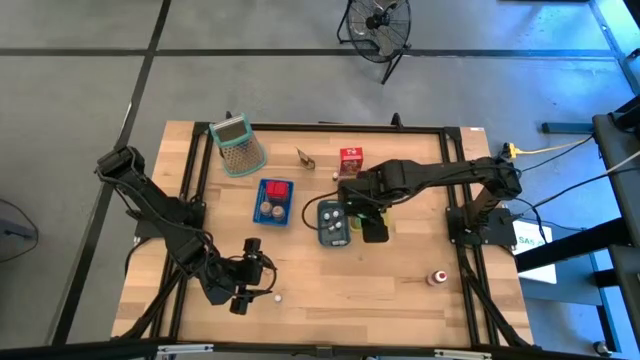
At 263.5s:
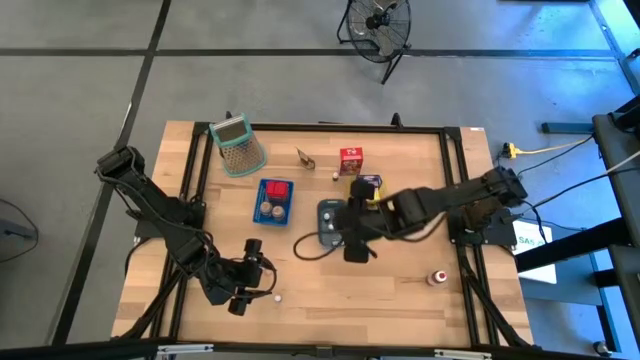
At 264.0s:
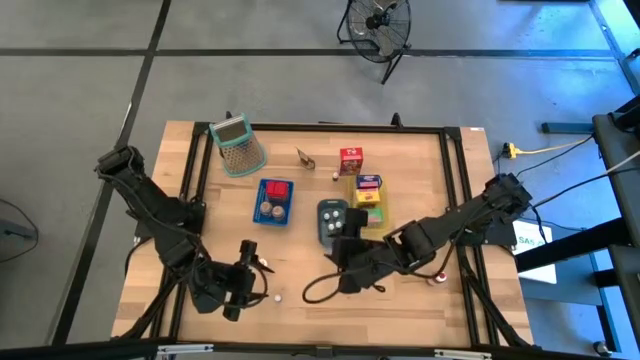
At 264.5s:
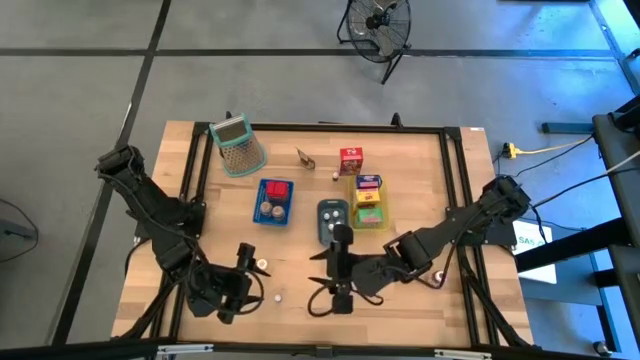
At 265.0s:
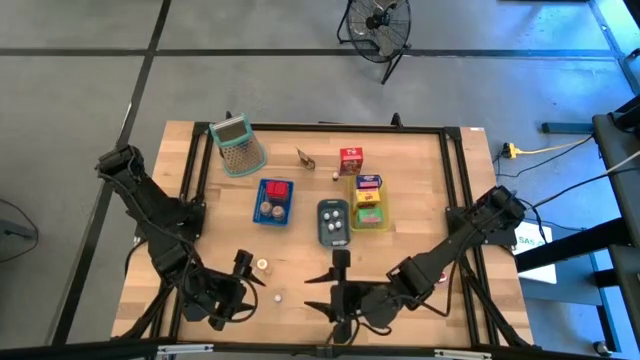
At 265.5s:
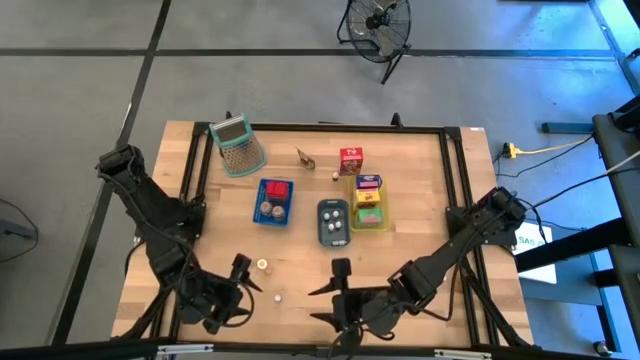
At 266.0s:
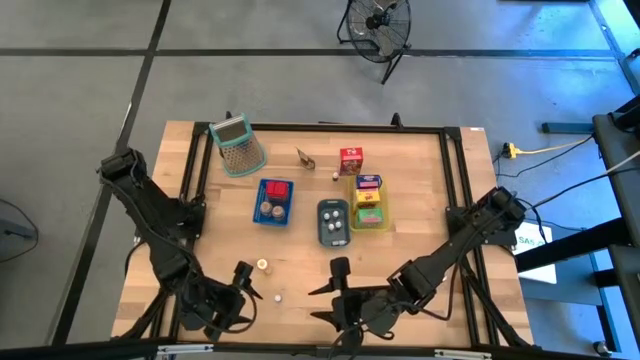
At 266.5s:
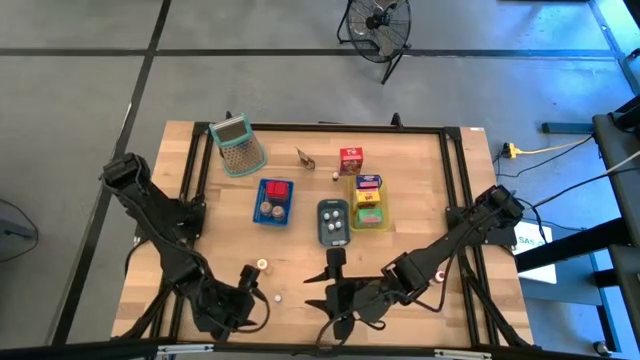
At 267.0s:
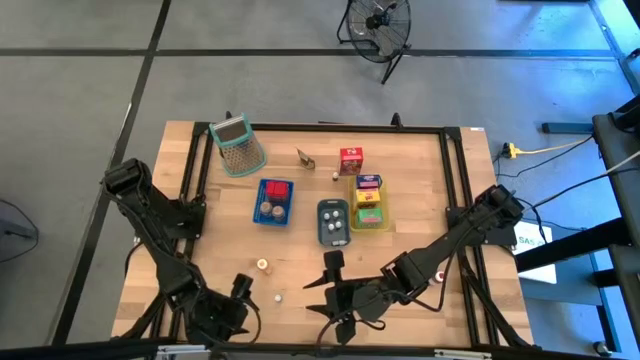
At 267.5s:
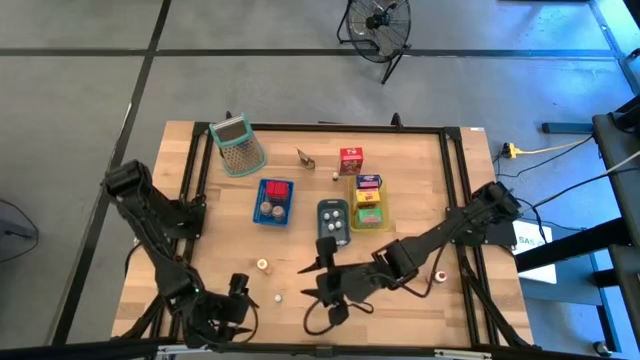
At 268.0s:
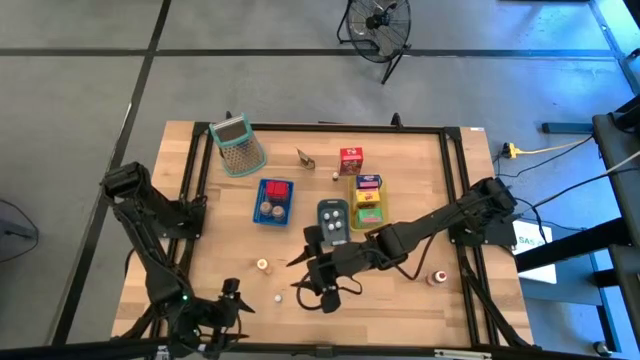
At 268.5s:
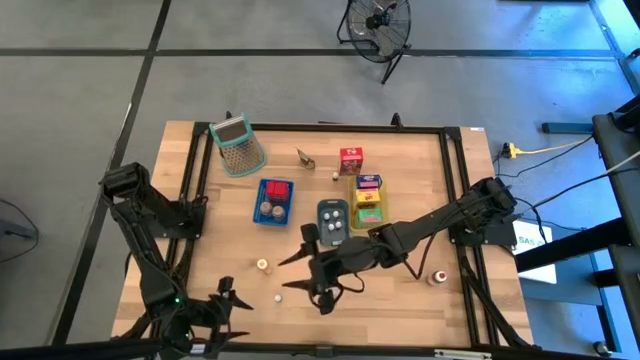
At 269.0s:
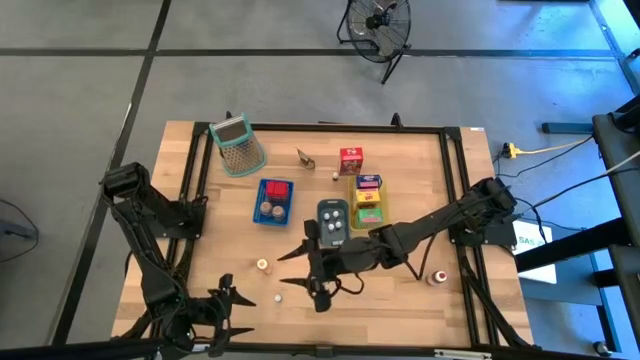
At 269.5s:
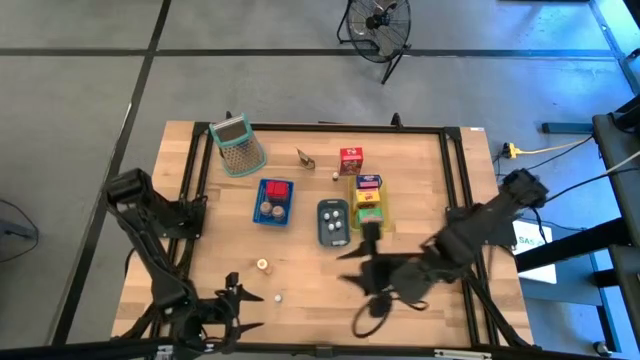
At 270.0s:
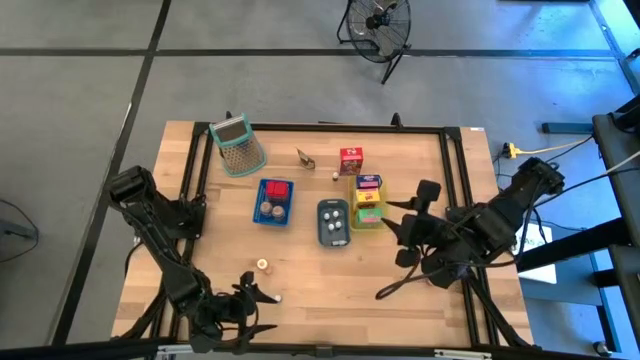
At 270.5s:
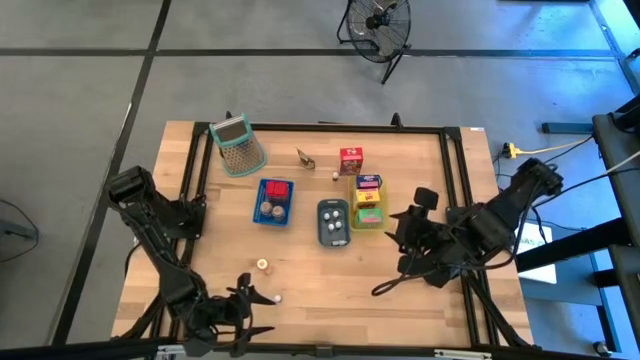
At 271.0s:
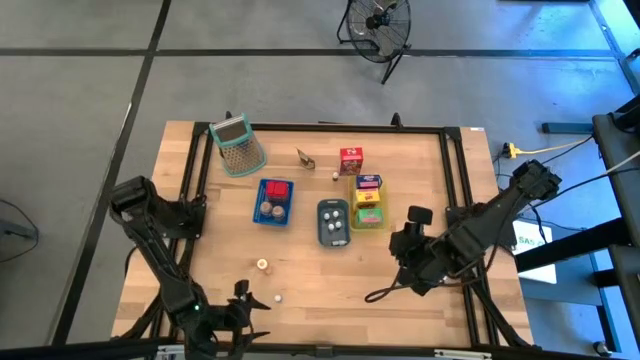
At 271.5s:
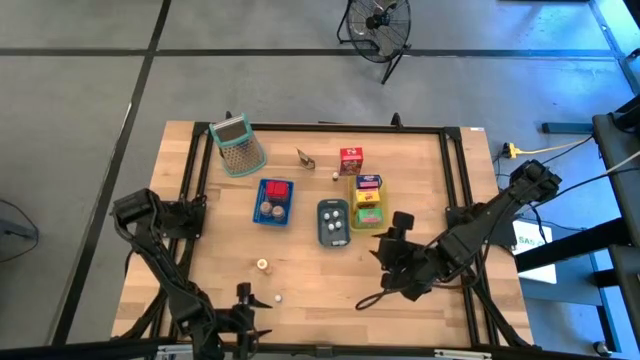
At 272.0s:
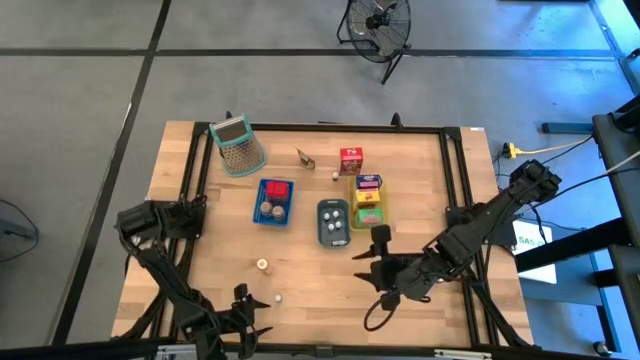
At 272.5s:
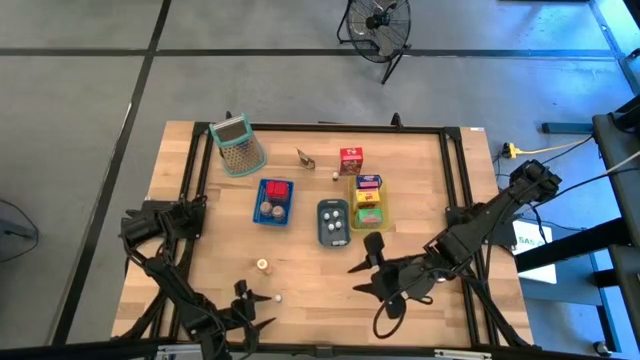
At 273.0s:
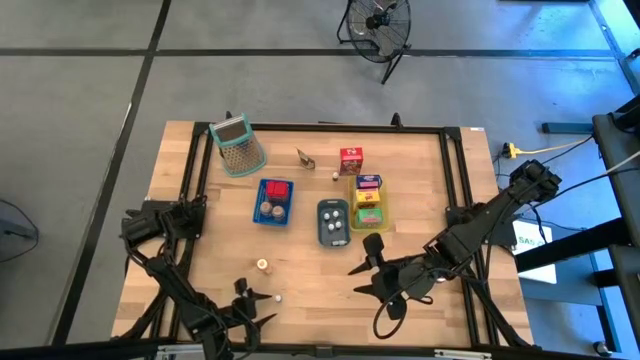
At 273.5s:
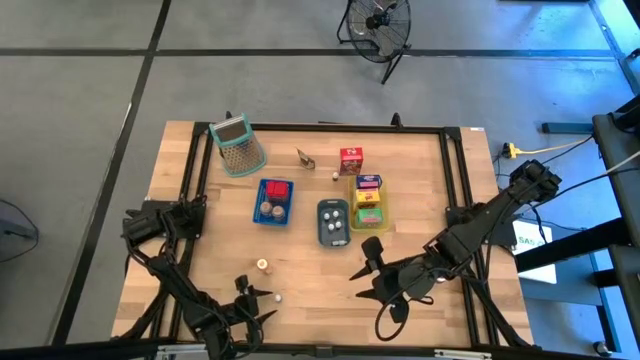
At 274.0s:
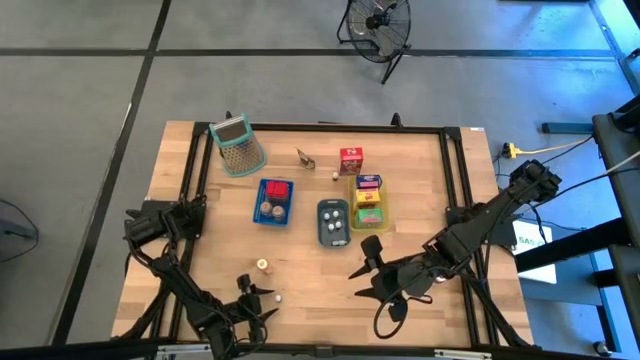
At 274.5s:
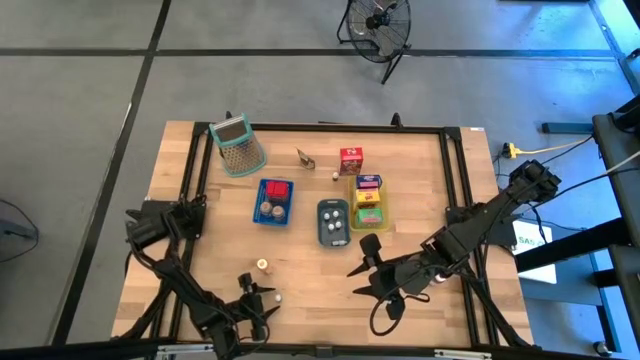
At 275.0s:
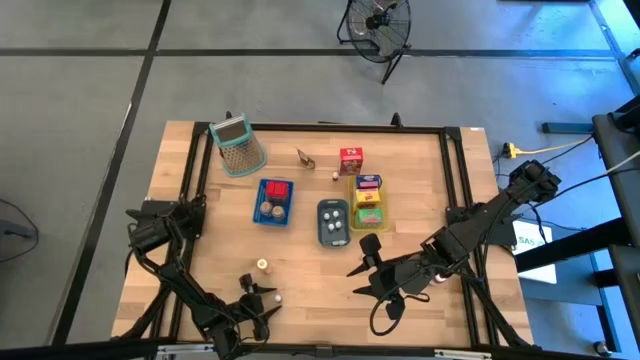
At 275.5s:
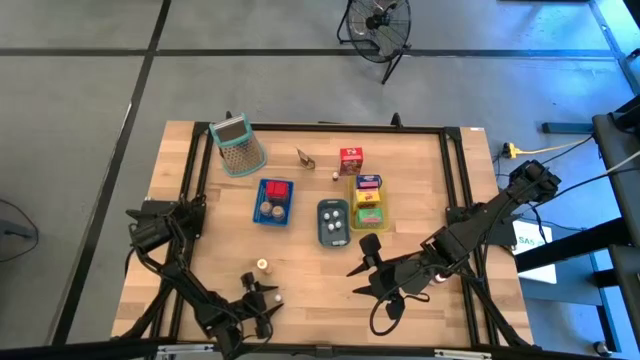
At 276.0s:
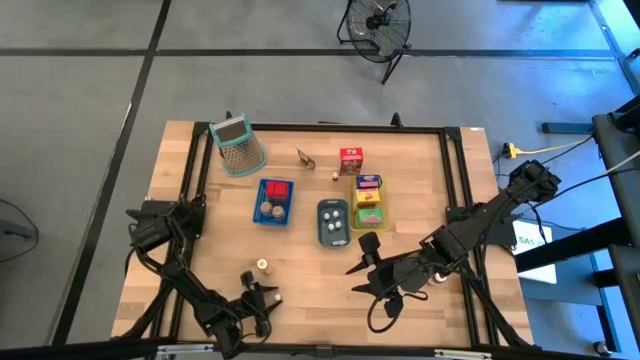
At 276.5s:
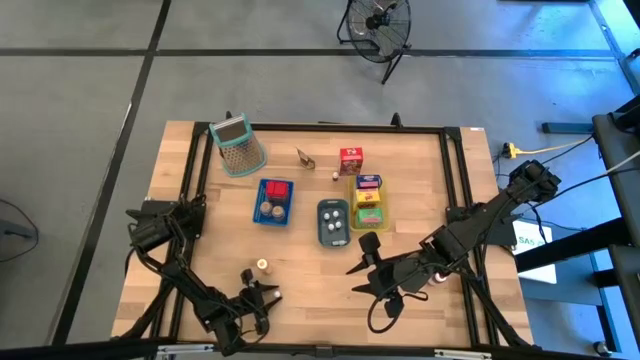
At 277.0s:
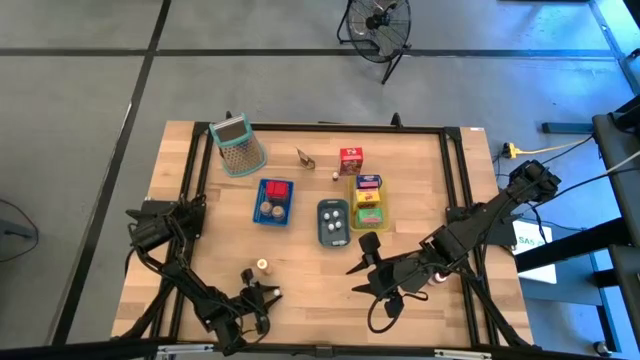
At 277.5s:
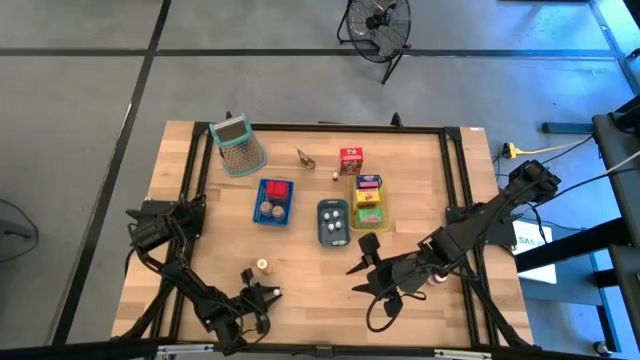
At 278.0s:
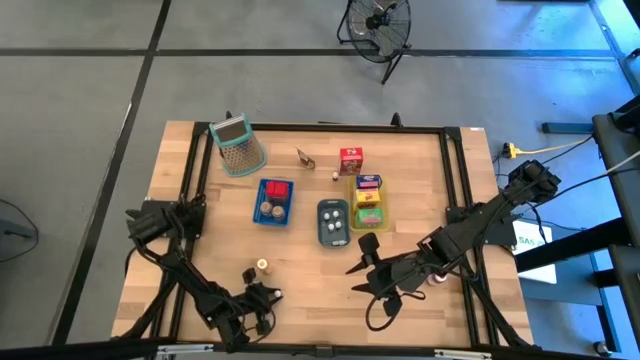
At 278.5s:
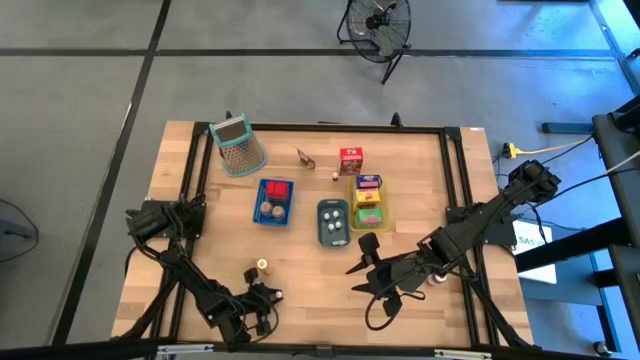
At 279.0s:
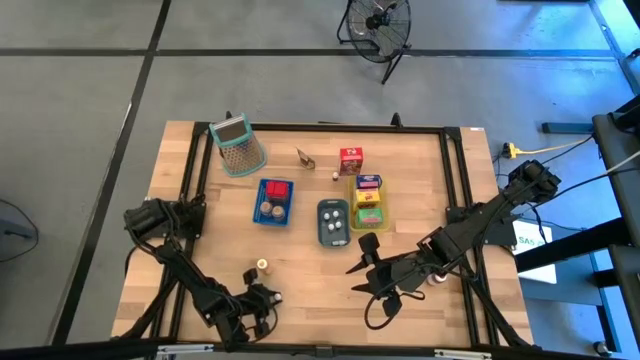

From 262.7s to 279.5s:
Task: Pick & Place Kitchen Items
Put the small green food coloring into the green bin

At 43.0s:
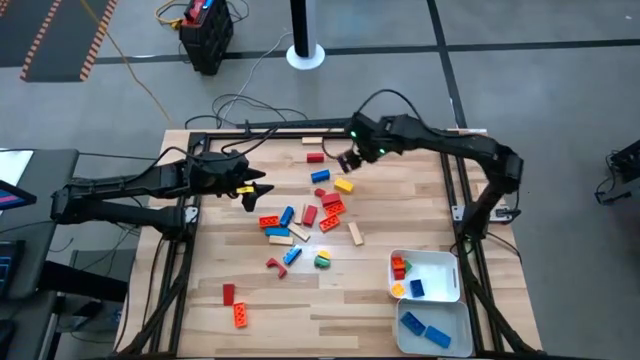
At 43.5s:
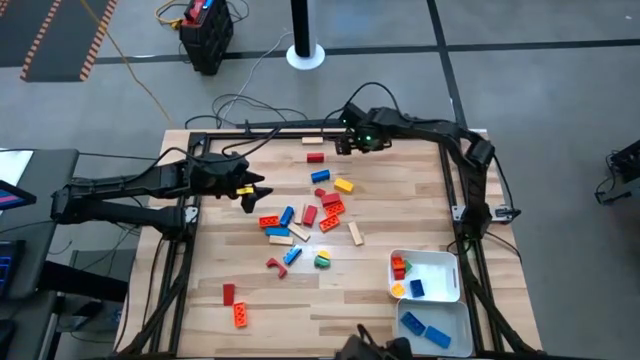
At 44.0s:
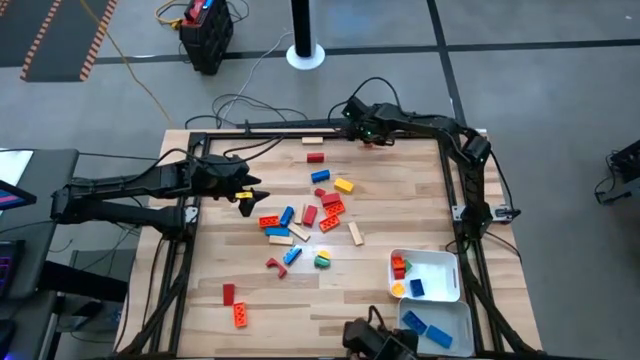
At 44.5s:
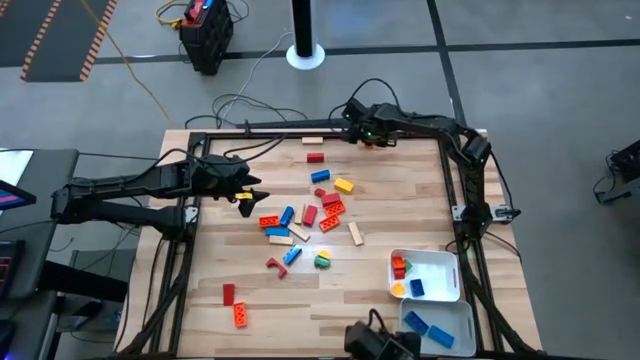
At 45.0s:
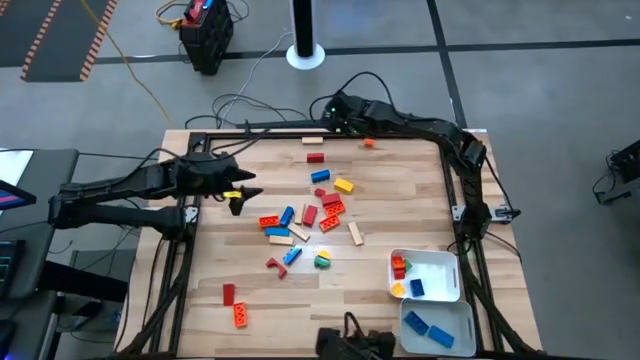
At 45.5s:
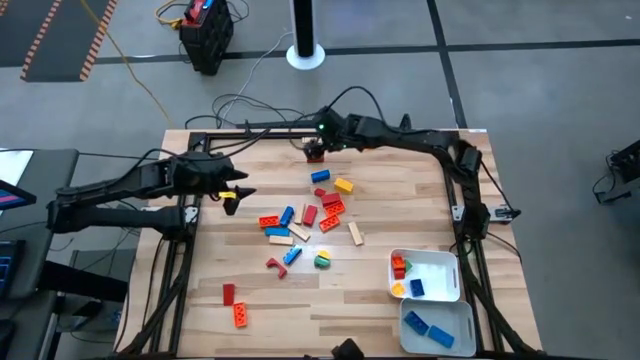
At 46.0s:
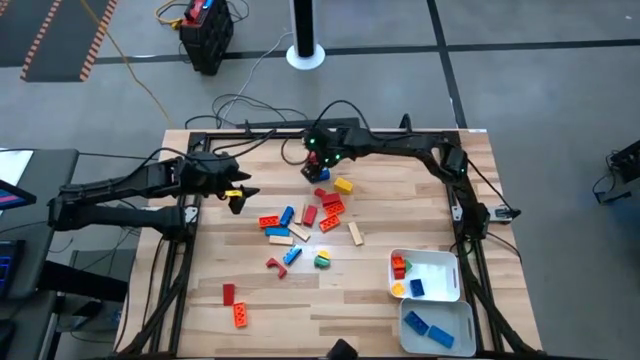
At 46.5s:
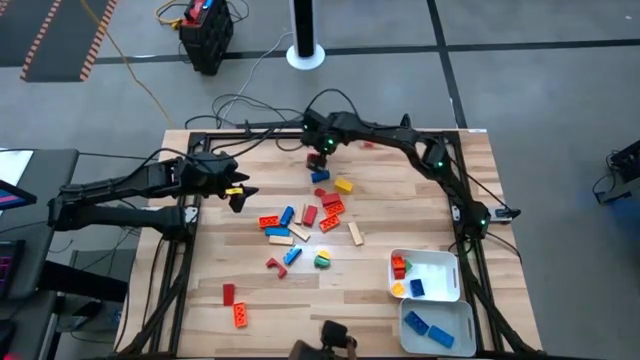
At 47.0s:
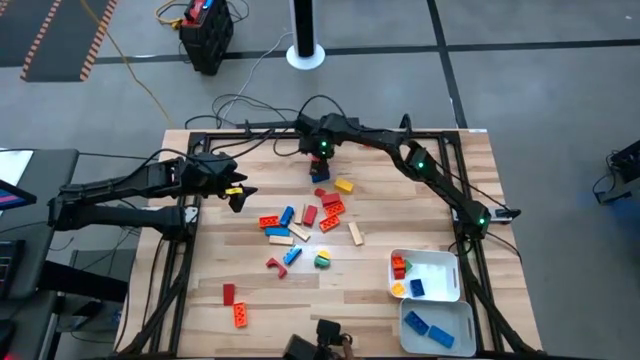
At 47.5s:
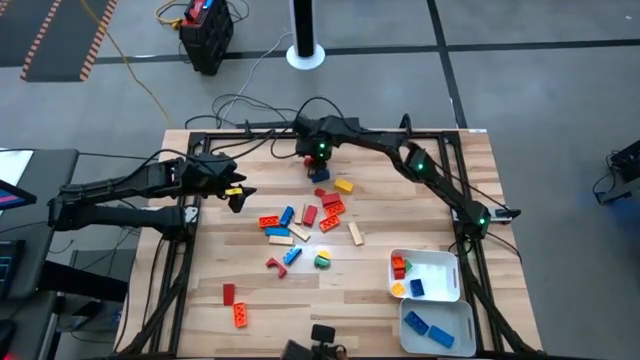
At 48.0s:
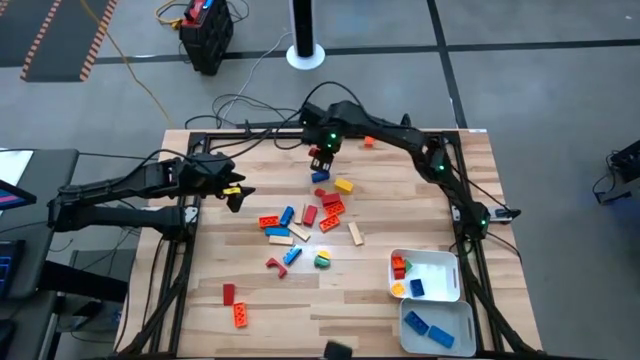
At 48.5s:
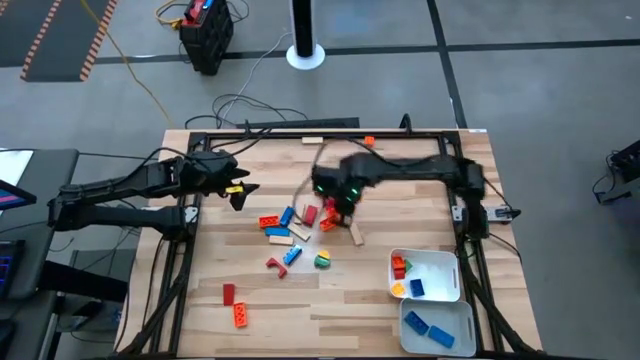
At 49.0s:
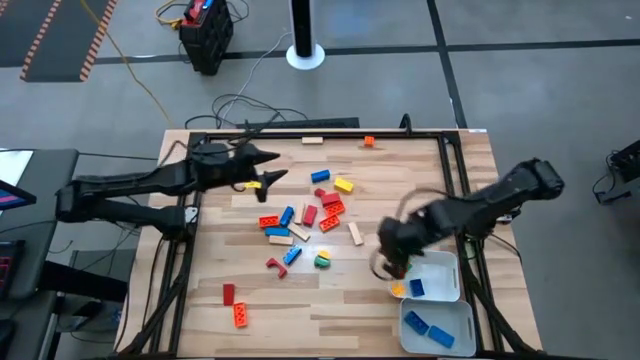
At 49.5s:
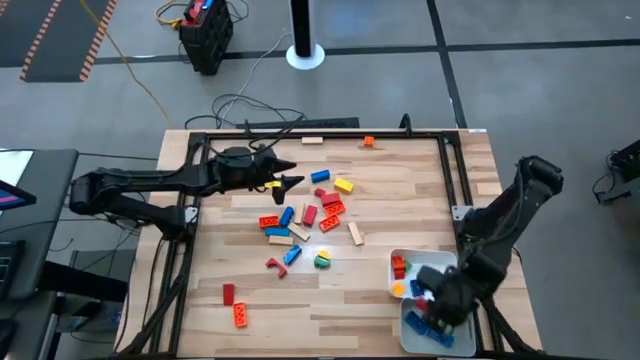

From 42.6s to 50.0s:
Task: Sort blocks by size
Put the big red block into the gray bin
